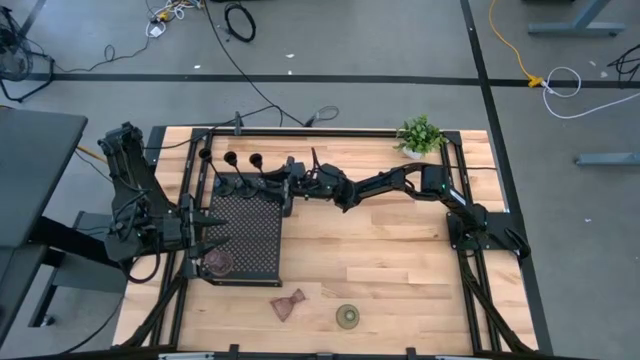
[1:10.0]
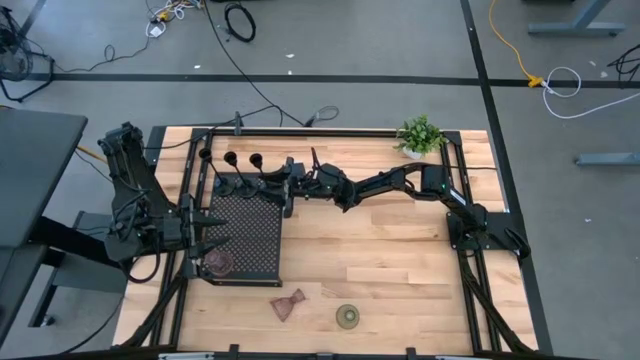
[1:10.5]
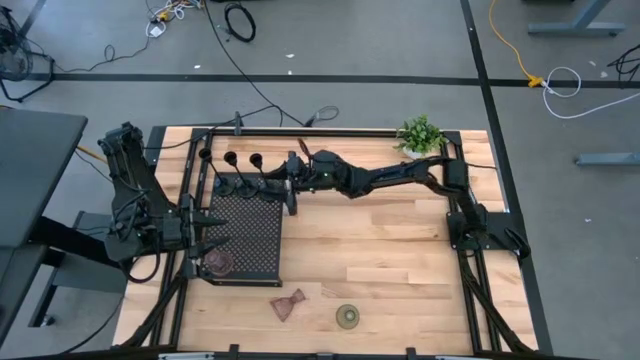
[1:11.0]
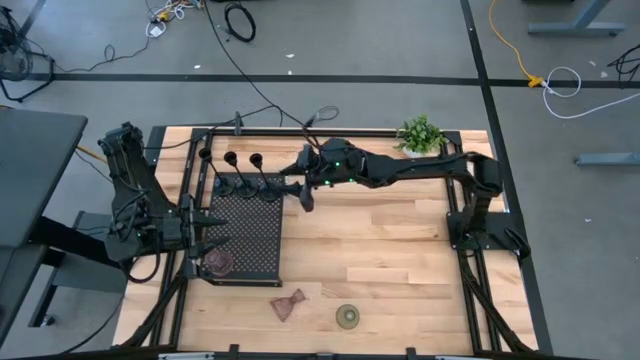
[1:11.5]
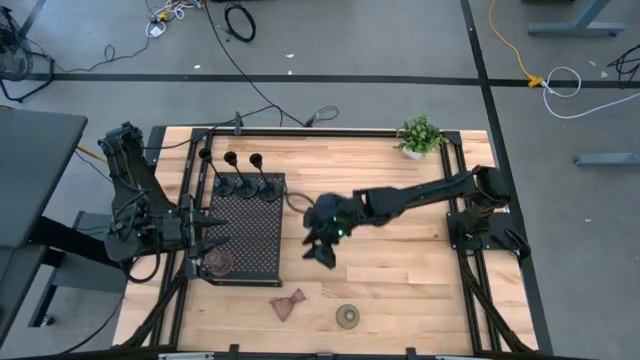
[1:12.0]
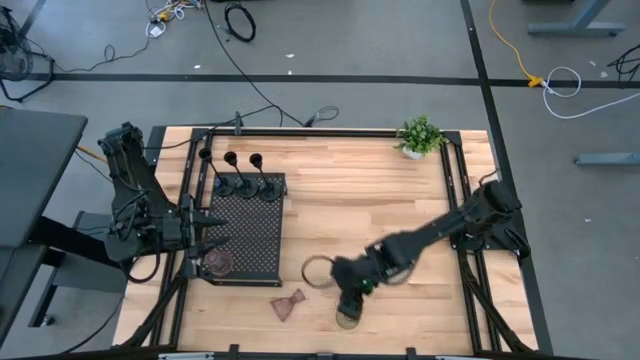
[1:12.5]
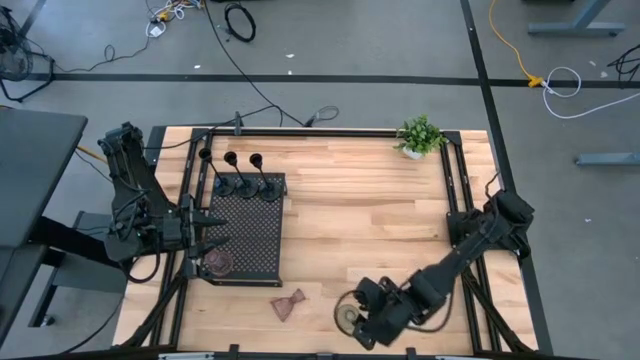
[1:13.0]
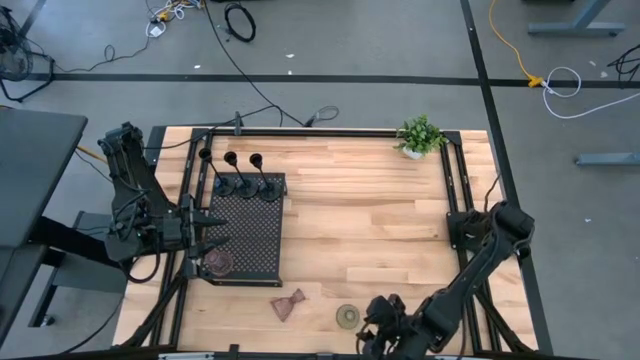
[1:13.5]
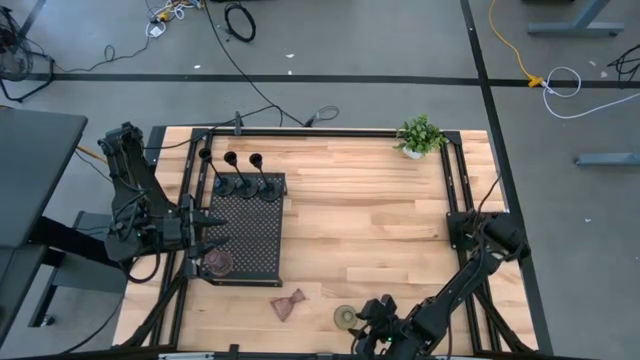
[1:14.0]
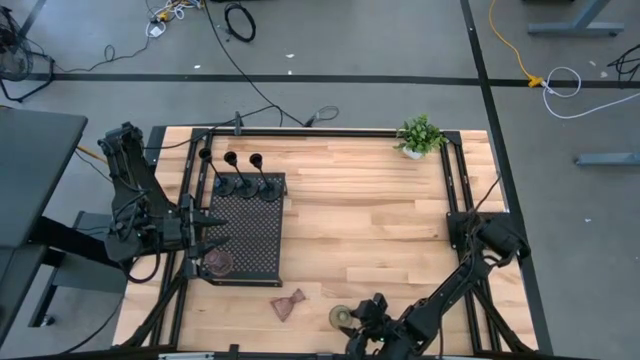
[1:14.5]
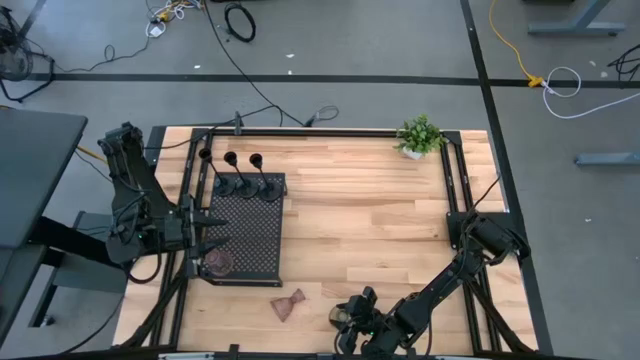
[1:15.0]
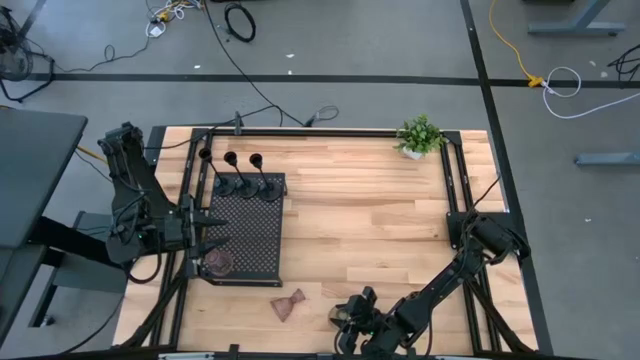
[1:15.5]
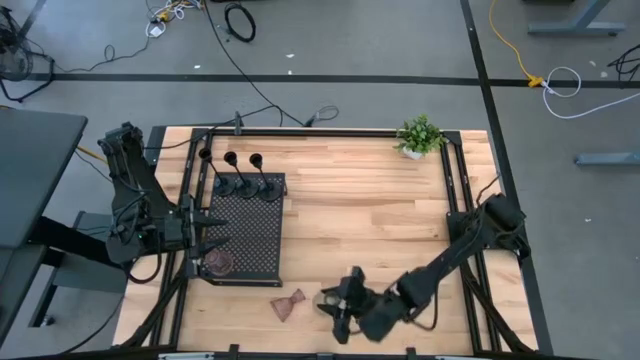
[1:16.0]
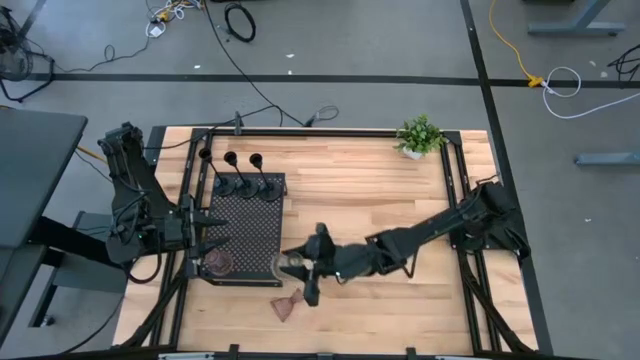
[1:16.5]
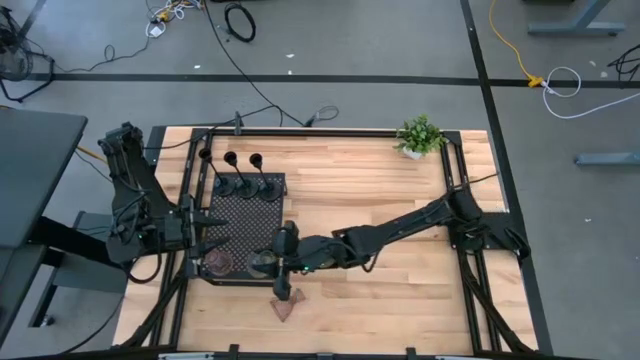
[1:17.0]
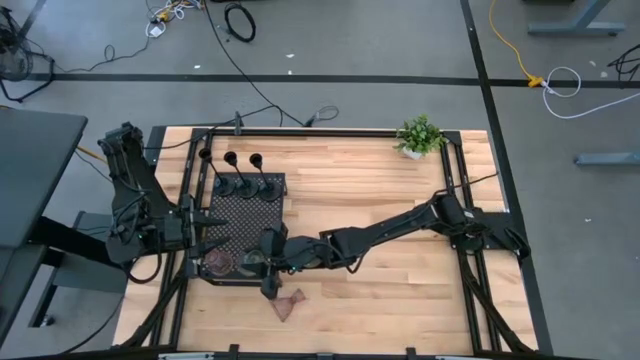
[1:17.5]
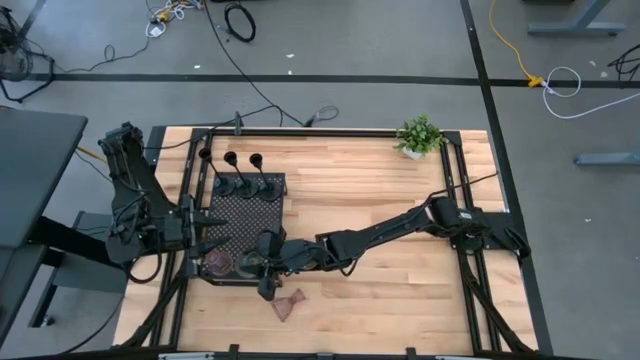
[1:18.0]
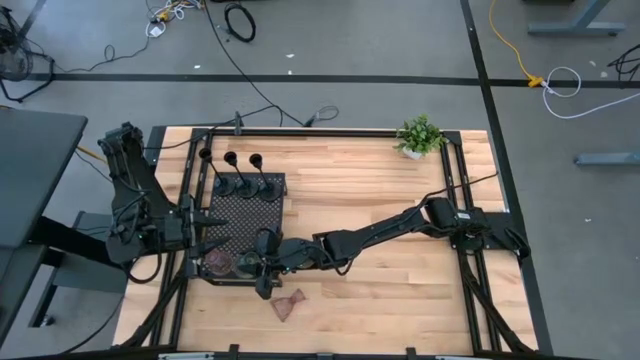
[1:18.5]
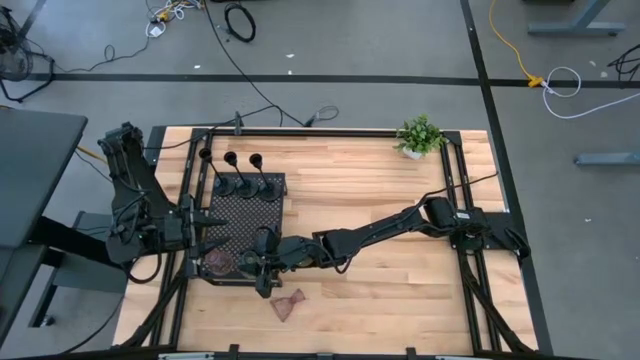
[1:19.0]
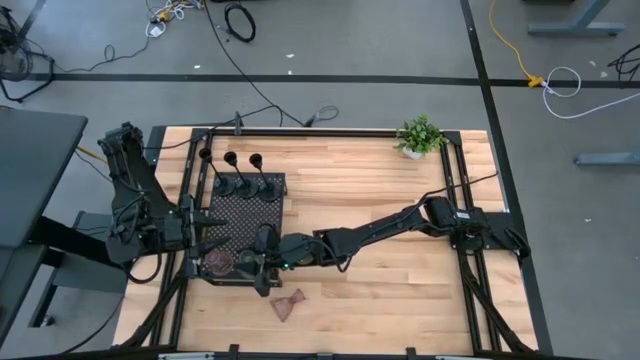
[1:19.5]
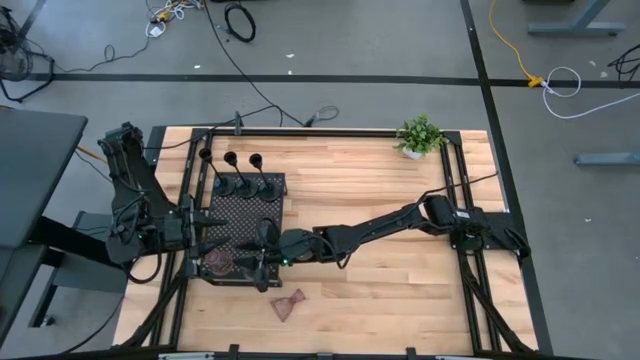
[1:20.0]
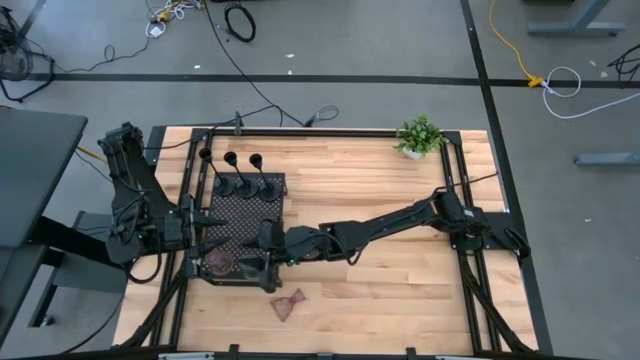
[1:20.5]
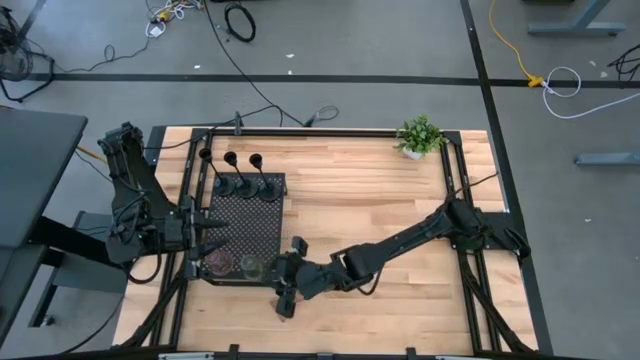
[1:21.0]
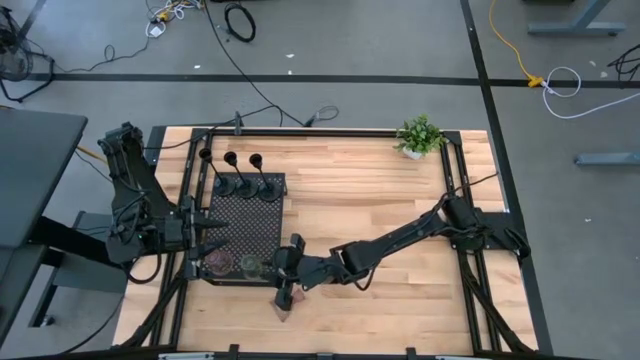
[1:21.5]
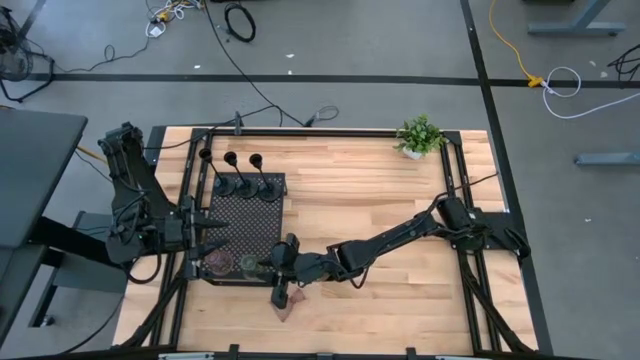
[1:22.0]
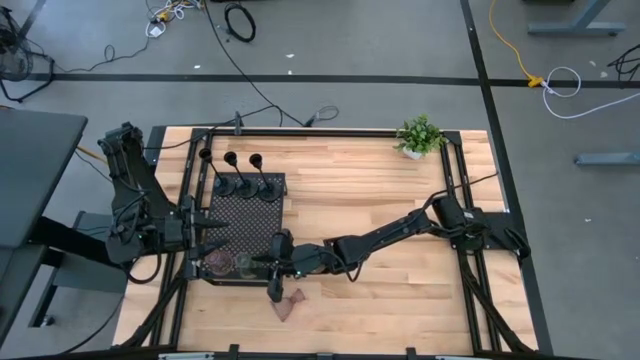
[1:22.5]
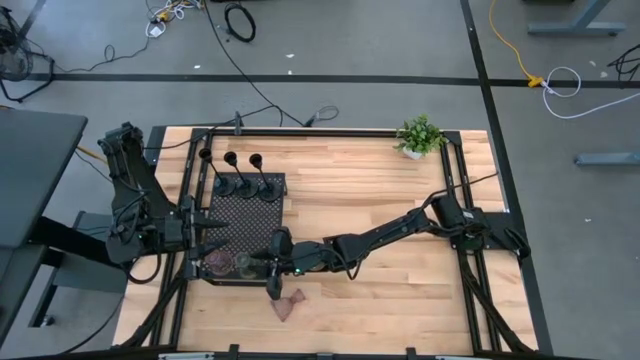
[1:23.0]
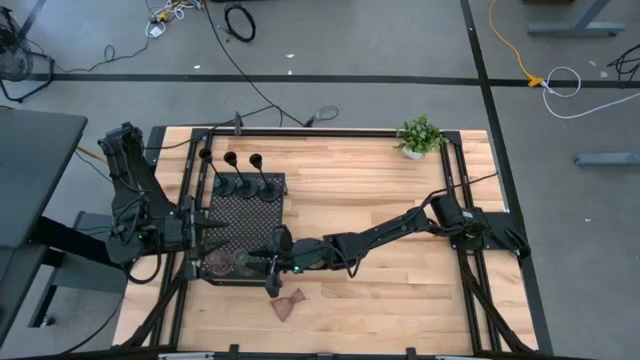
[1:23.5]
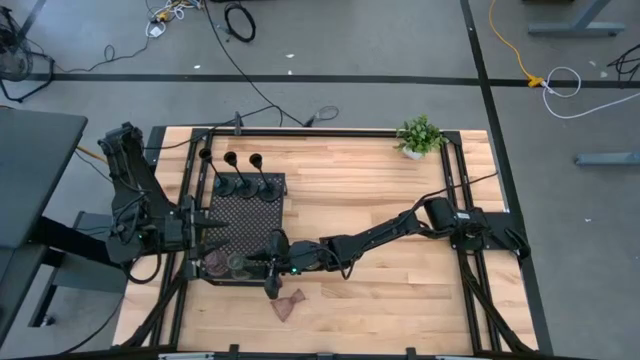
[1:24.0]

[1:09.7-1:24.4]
Task: Pick & Place candle stick holders
Put the green glass candle holder on the shelf aligned with the pink glass candle holder

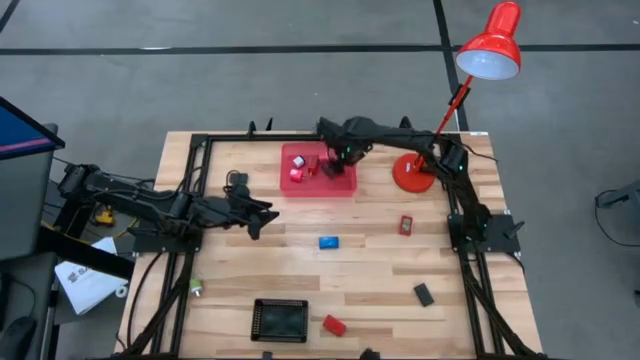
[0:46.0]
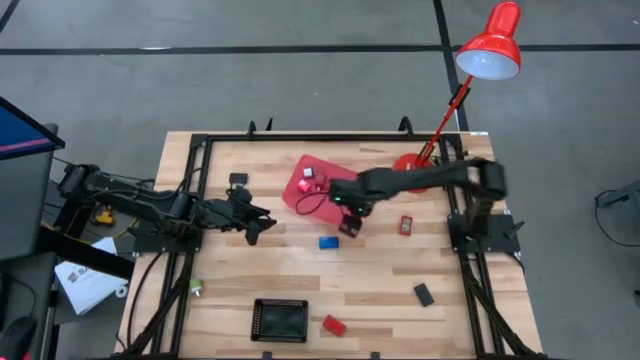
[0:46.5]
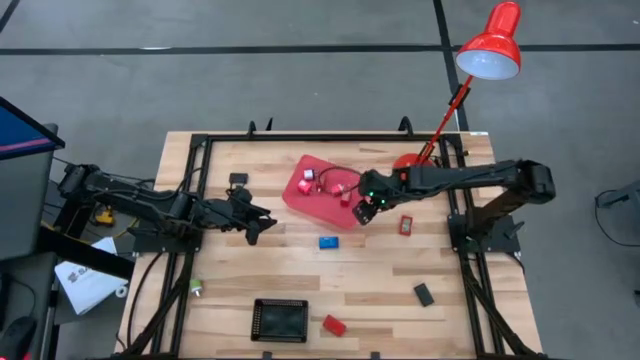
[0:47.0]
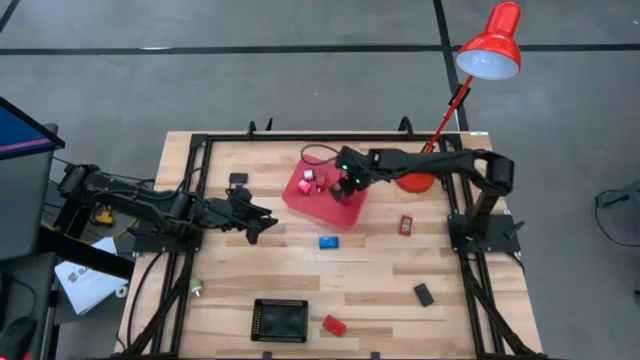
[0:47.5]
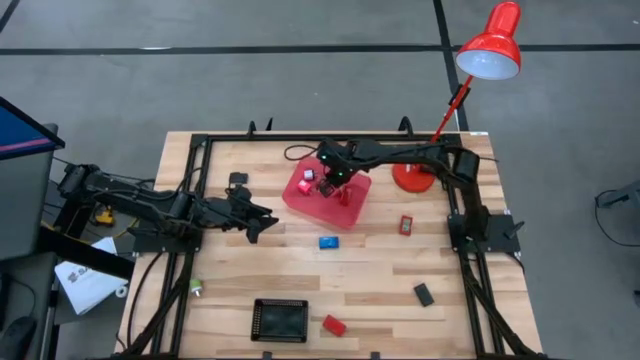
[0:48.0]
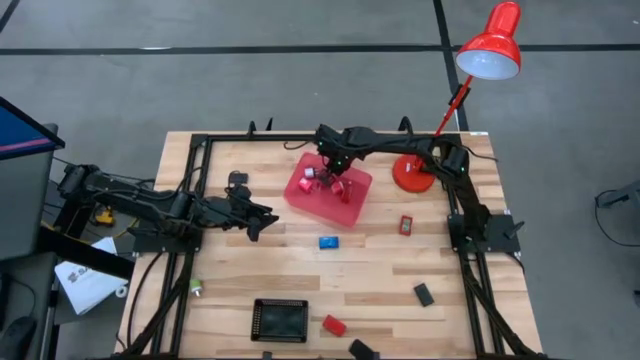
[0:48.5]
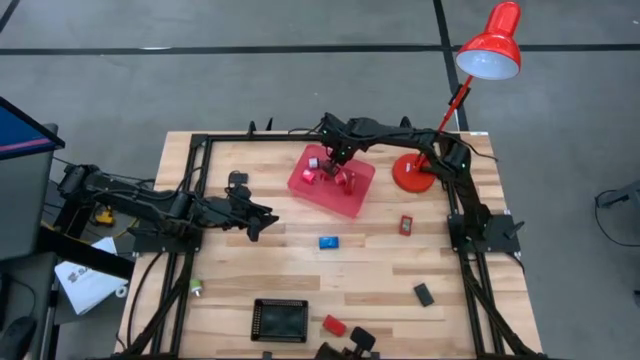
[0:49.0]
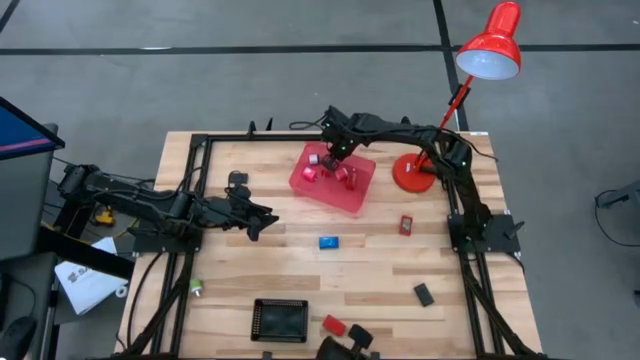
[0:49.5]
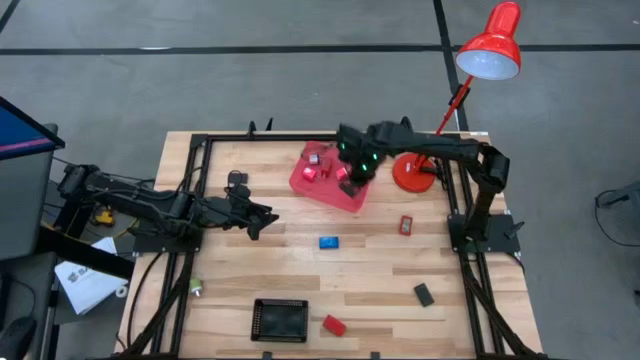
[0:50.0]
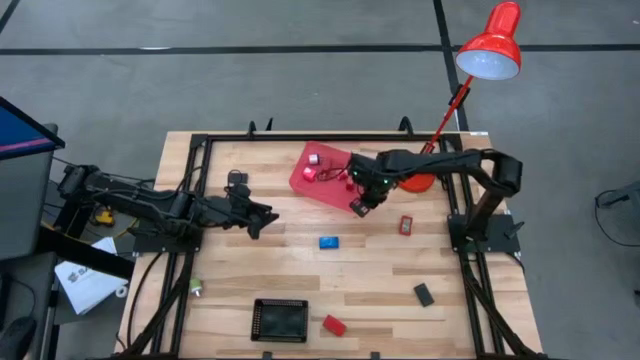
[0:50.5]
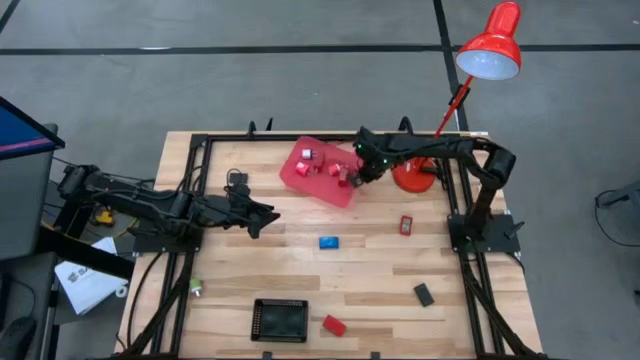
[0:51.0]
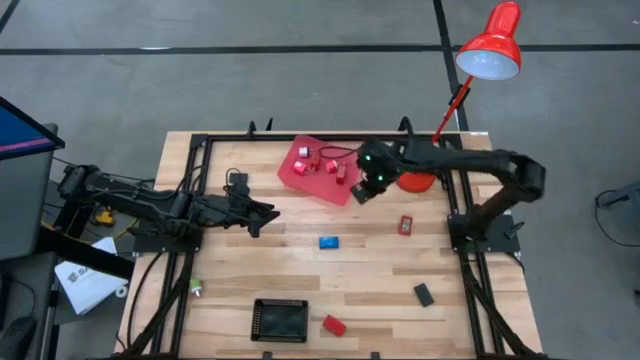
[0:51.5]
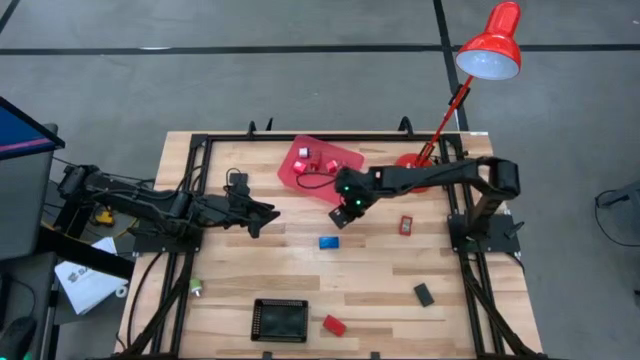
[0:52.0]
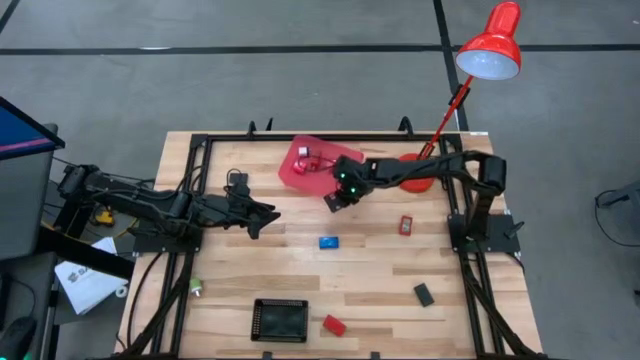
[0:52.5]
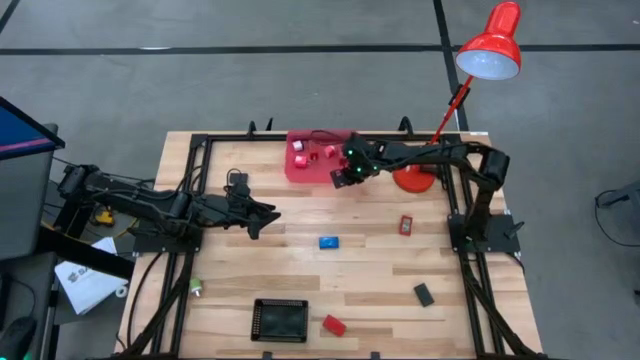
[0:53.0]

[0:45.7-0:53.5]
Task: Pick & Place Office items
Move the pink bin to the top center of the table
